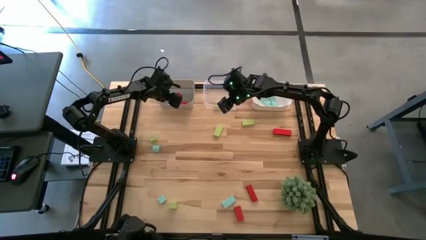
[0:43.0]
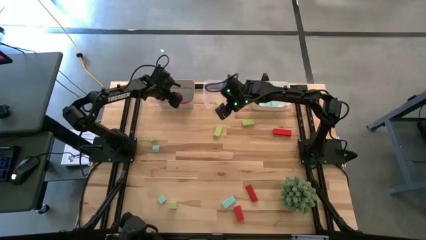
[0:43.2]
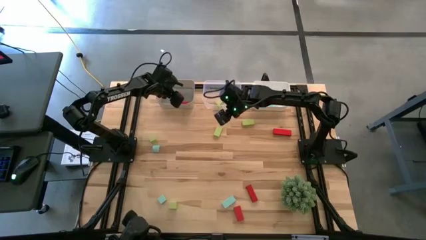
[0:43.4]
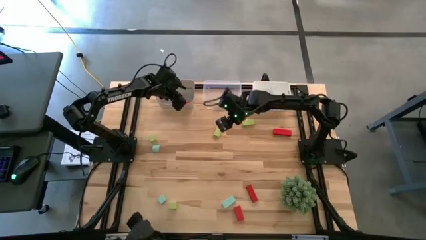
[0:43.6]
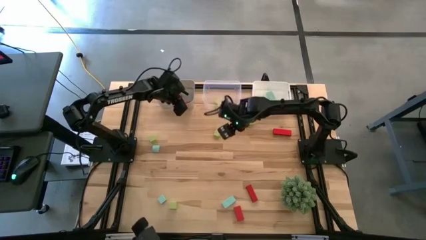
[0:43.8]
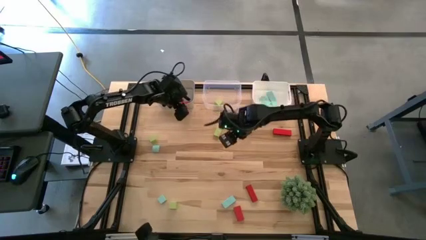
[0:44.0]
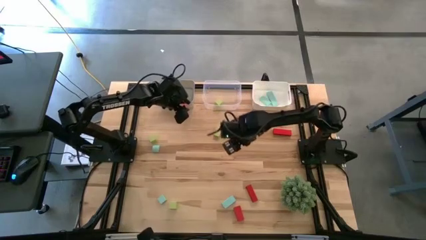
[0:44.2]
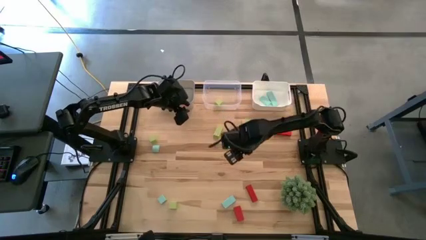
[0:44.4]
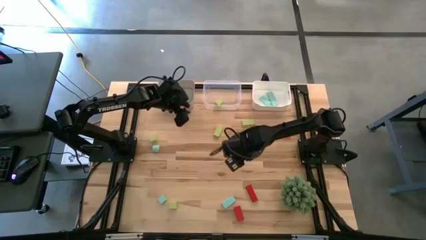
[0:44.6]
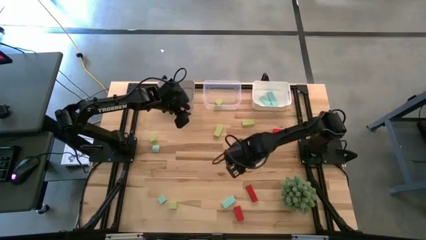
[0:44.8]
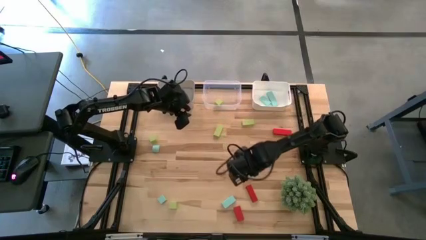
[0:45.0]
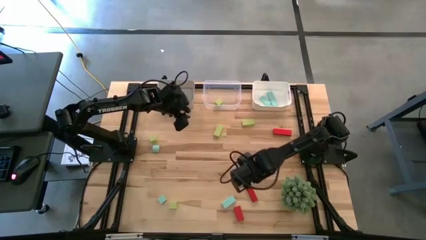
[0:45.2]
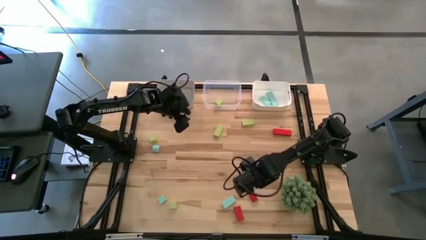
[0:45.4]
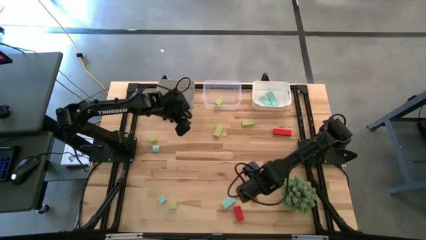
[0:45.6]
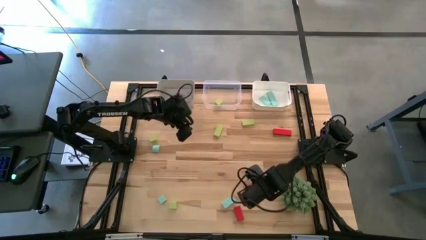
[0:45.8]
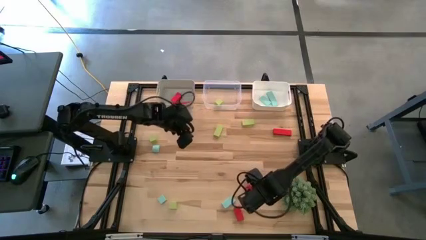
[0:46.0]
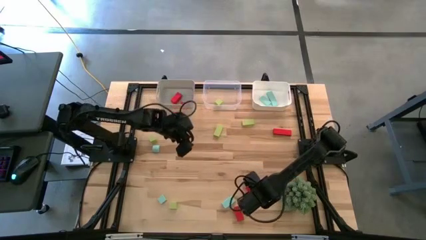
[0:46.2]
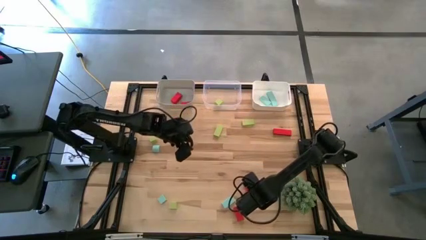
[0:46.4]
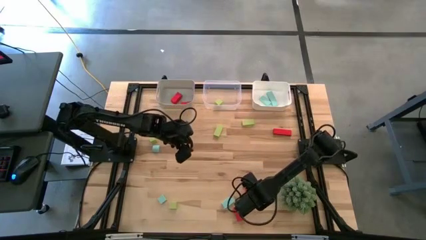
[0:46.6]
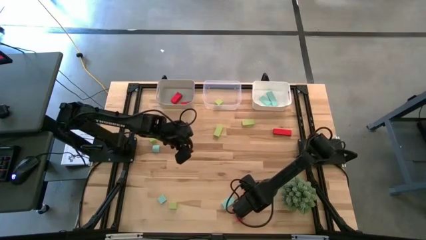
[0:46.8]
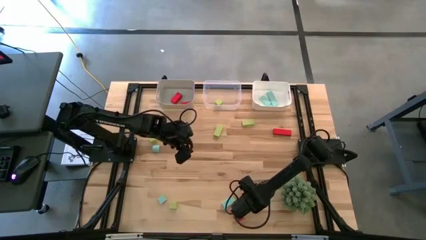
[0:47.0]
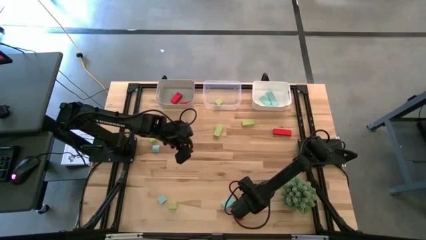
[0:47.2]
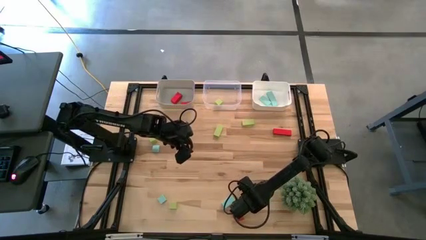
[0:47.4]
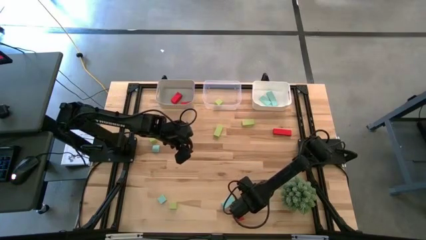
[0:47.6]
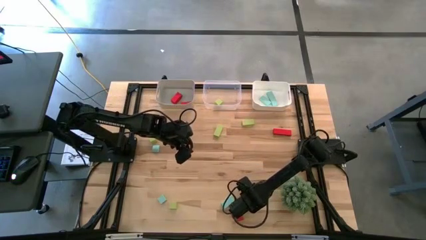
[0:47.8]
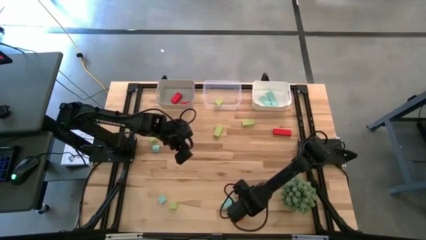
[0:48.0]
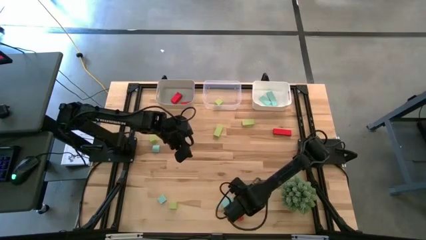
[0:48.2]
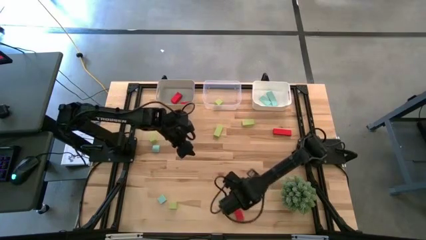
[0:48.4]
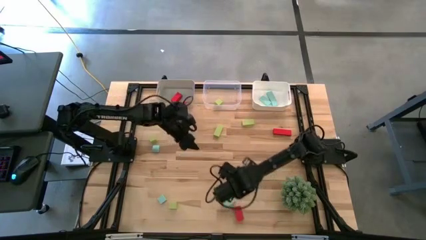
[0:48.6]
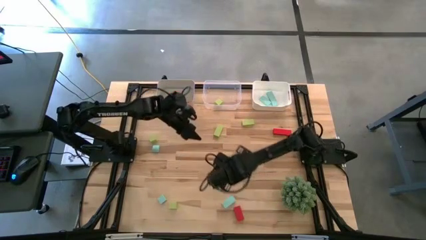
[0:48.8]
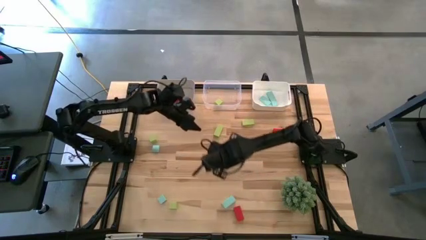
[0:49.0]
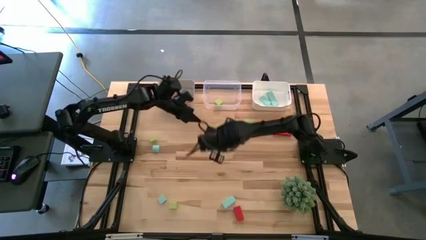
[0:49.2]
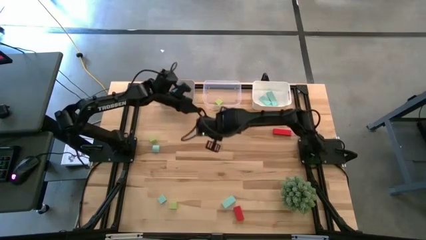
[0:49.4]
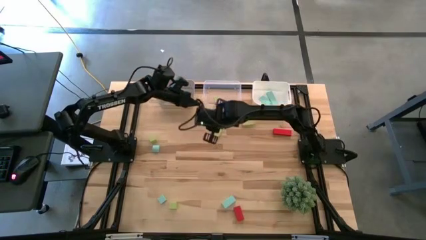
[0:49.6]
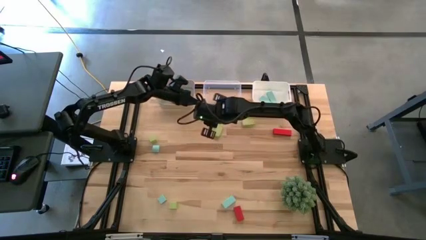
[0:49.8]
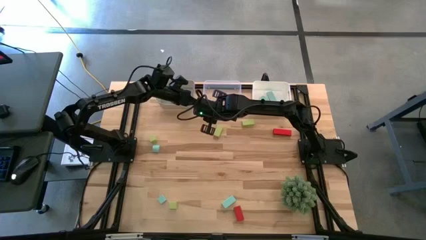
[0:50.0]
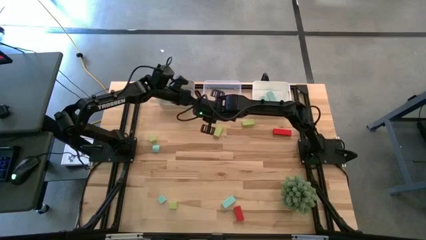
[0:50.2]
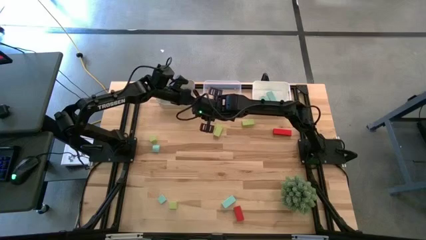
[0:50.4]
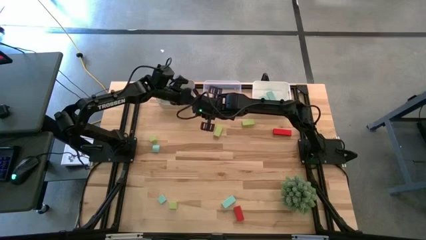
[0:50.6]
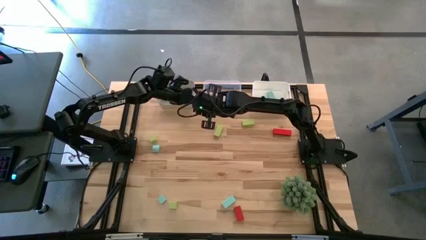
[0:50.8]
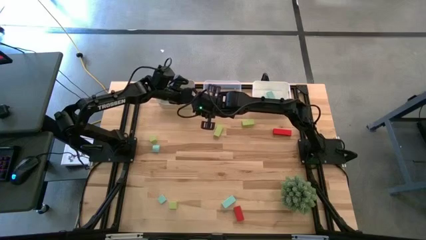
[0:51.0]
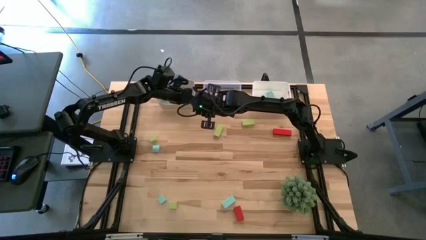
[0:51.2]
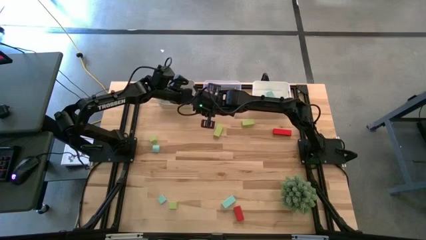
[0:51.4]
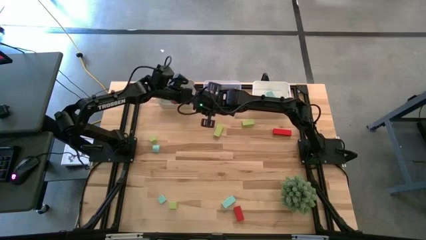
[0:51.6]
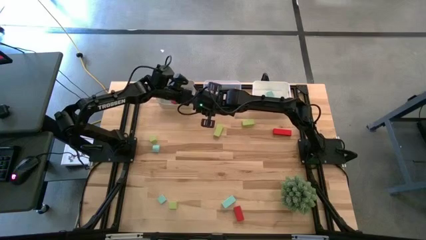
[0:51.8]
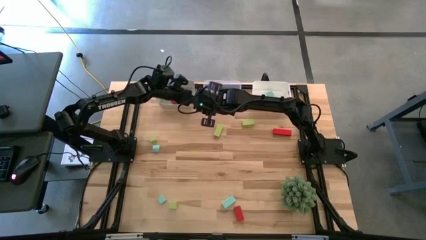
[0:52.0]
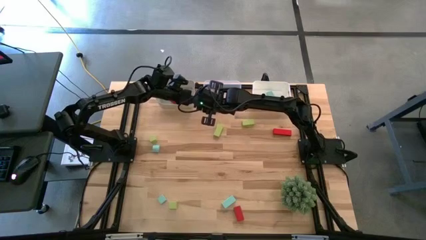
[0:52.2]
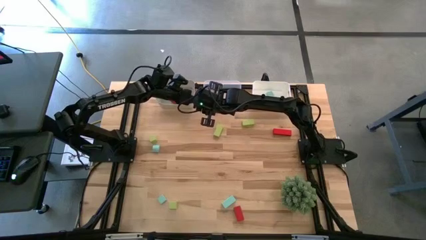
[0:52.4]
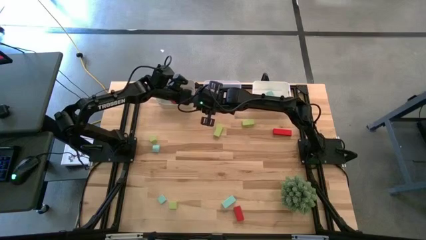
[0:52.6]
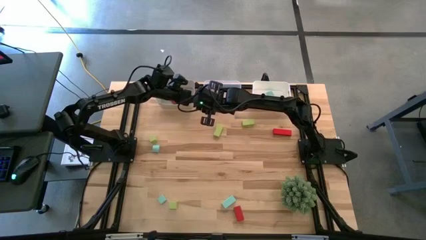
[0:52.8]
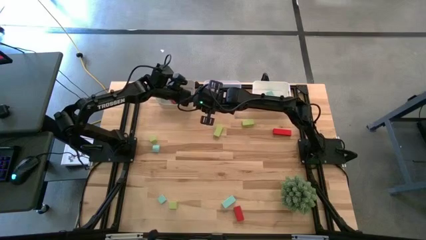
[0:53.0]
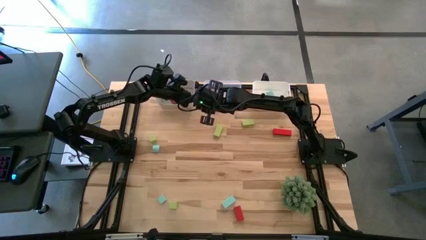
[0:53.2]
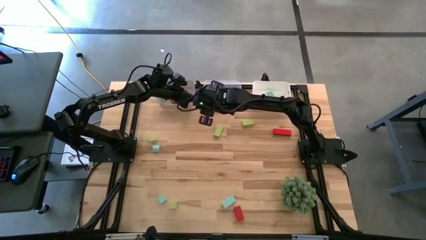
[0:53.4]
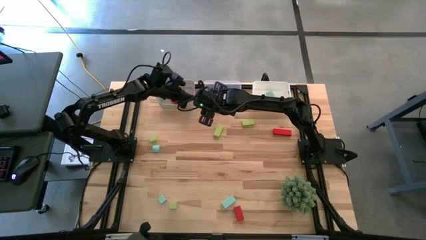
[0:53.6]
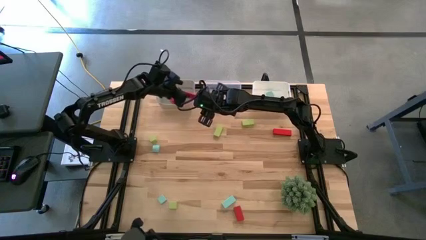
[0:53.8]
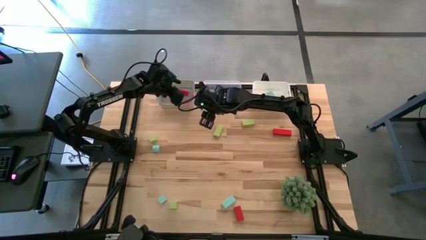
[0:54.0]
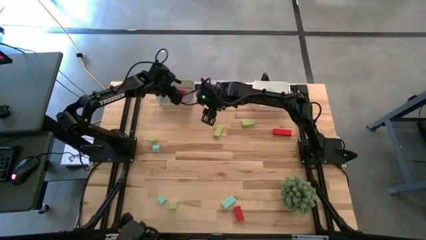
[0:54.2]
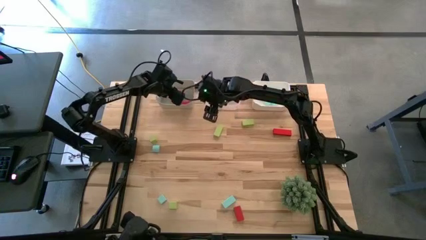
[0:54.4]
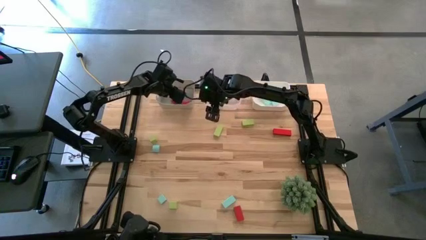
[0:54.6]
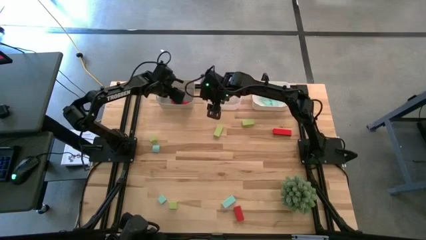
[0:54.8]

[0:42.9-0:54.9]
Task: Sort & place blocks by color
Put the red block into the gray bin

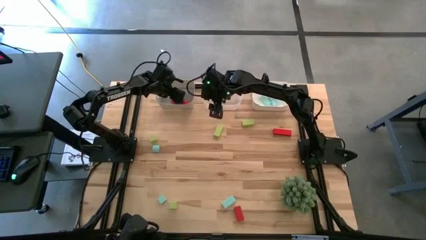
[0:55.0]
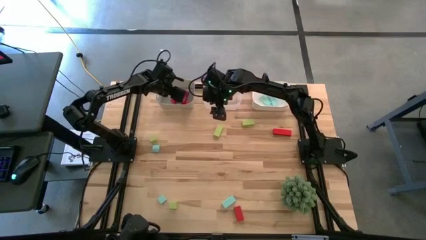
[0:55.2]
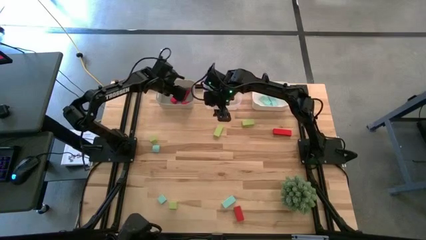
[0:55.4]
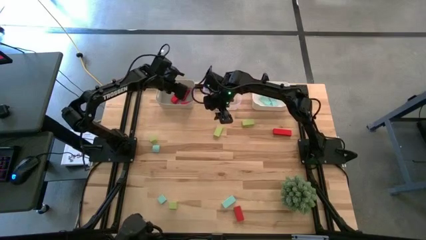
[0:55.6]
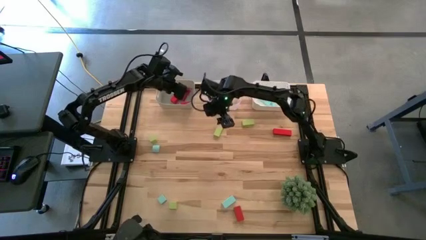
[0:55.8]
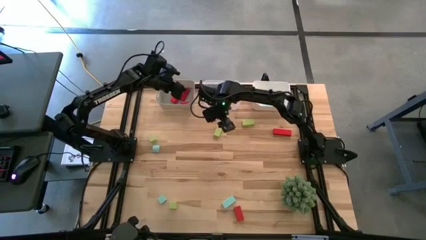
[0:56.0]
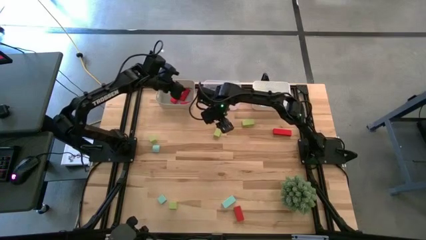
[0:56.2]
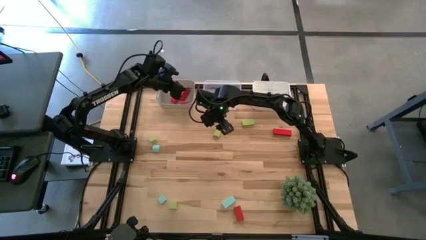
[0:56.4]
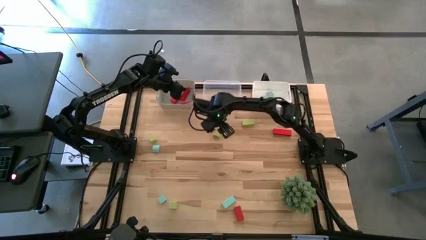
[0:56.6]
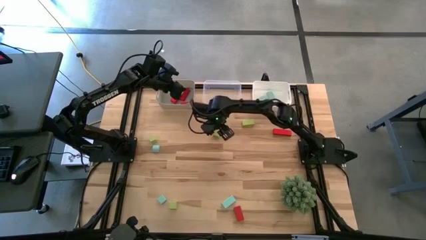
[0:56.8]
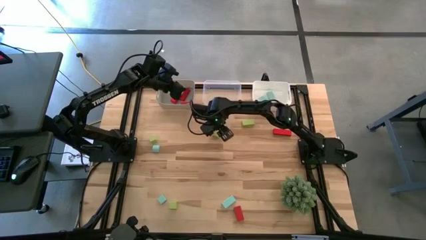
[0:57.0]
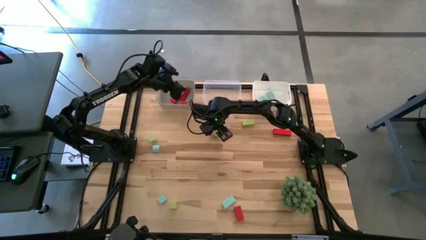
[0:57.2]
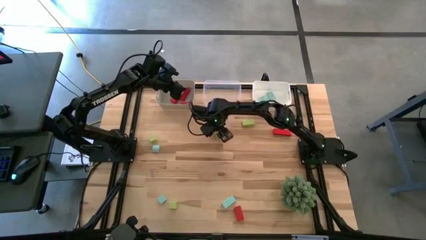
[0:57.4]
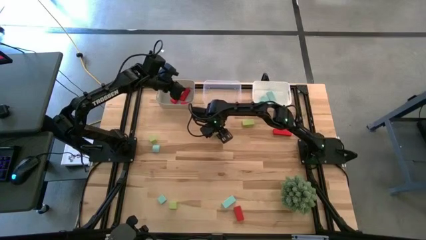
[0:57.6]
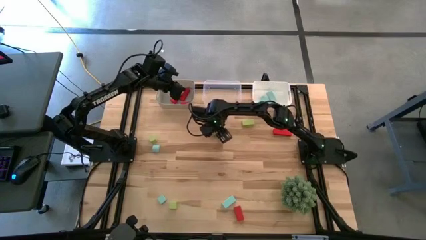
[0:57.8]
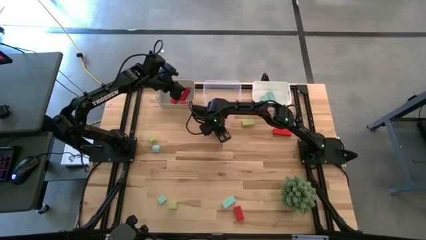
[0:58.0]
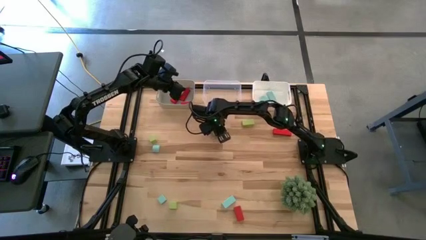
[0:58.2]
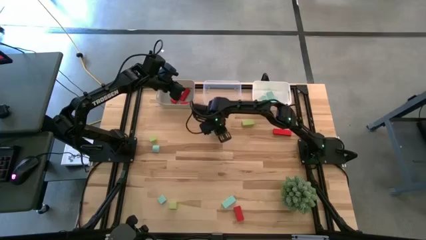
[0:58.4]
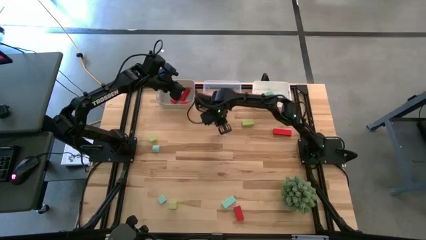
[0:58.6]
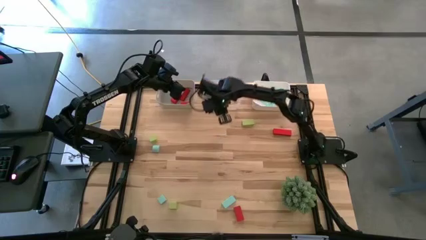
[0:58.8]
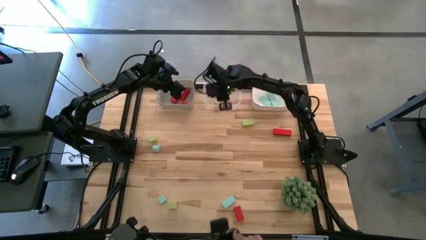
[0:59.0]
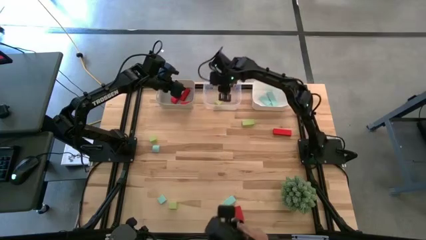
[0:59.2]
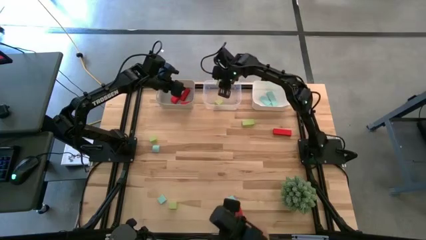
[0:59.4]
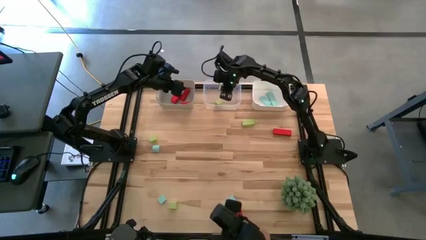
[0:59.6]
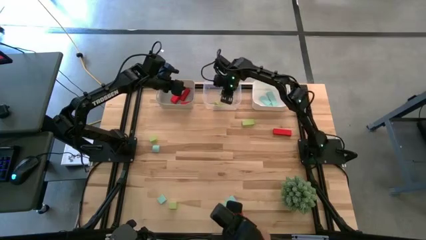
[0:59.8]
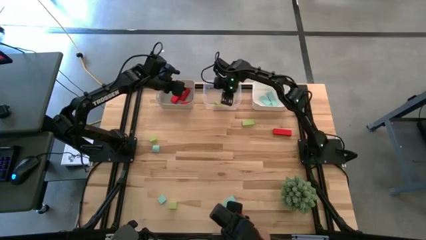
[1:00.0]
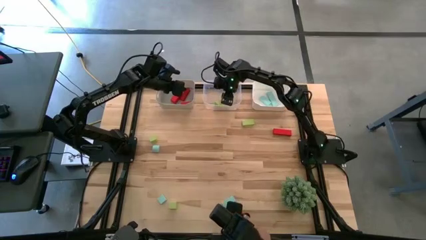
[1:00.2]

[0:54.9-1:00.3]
Put the green block into the transparent bin
